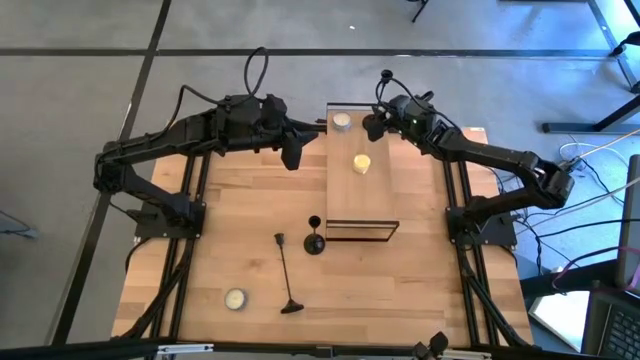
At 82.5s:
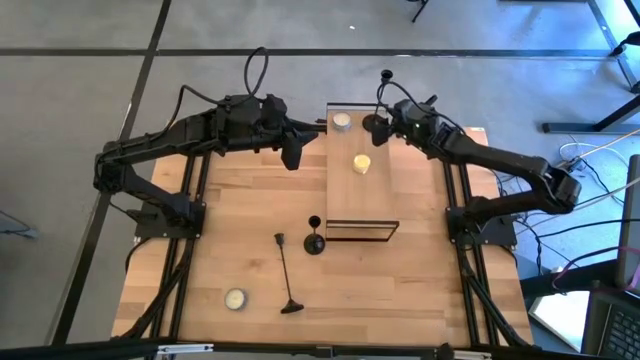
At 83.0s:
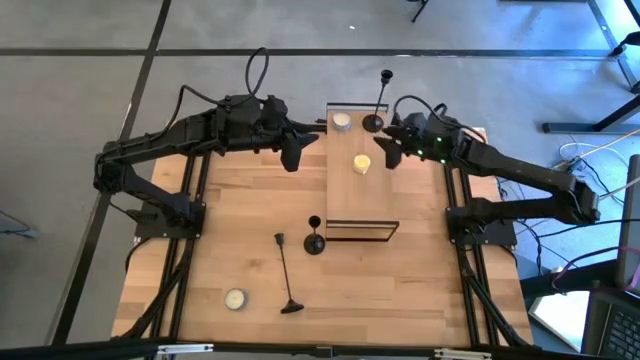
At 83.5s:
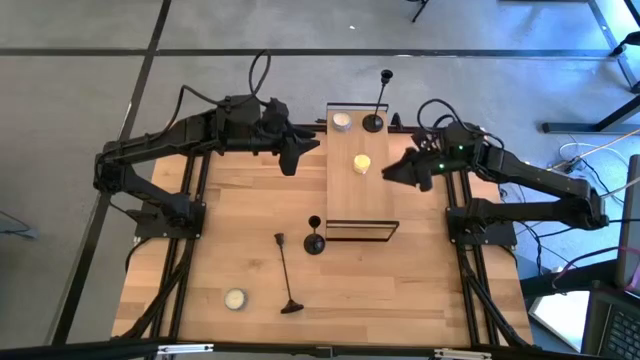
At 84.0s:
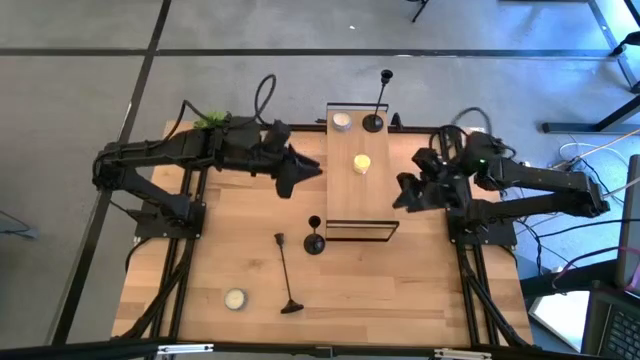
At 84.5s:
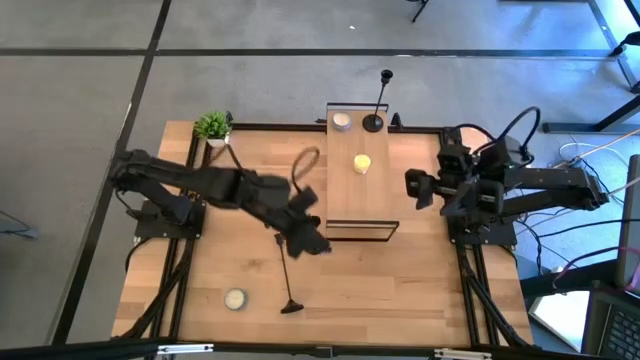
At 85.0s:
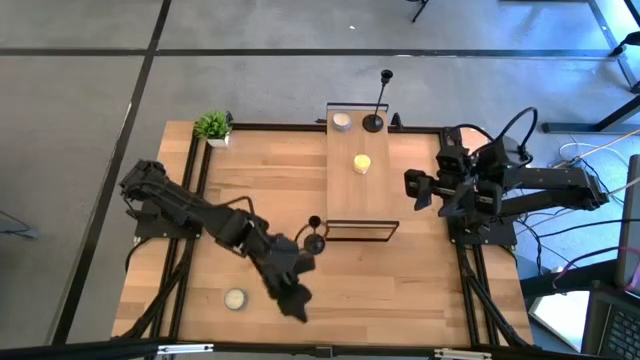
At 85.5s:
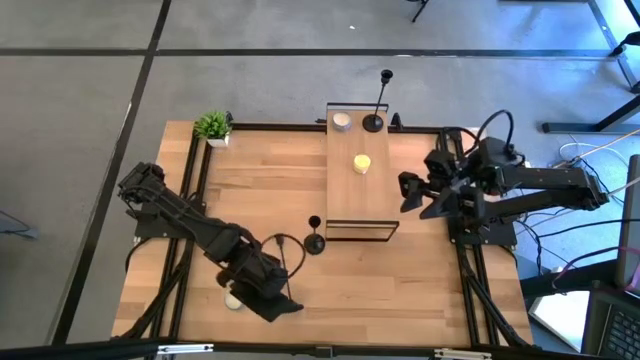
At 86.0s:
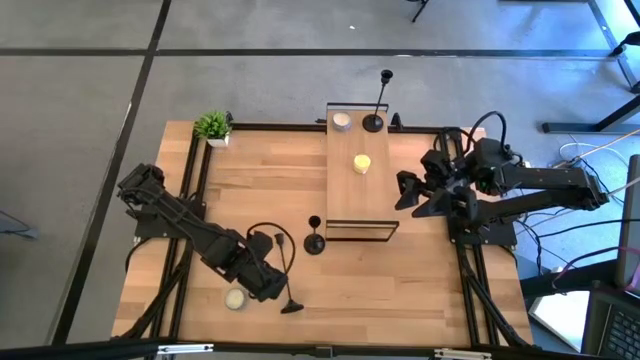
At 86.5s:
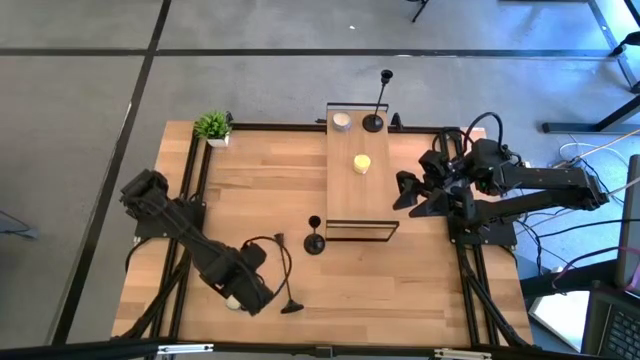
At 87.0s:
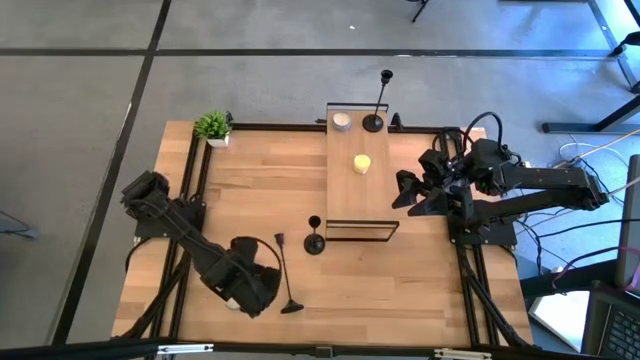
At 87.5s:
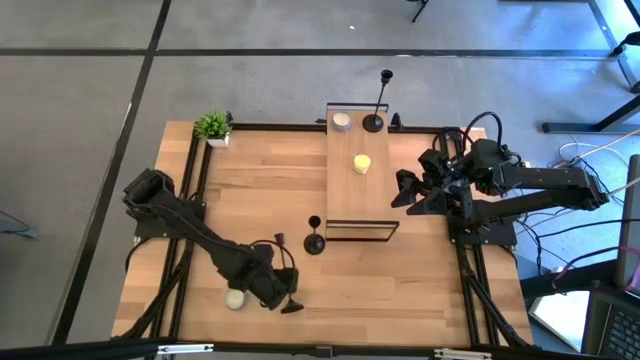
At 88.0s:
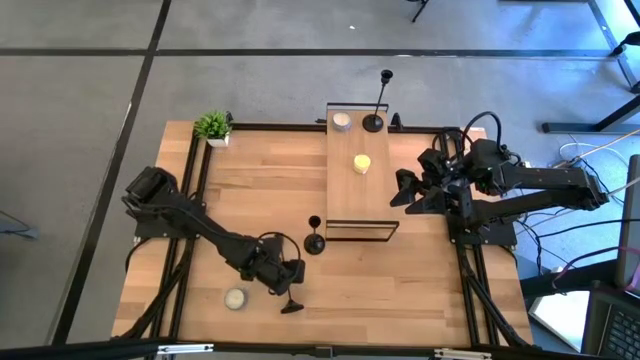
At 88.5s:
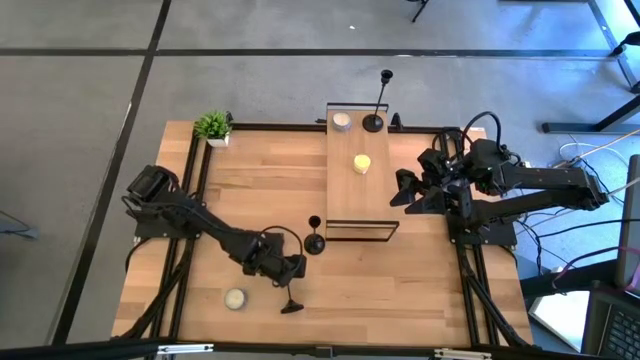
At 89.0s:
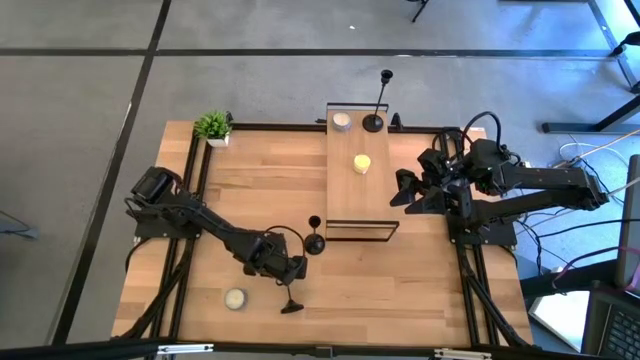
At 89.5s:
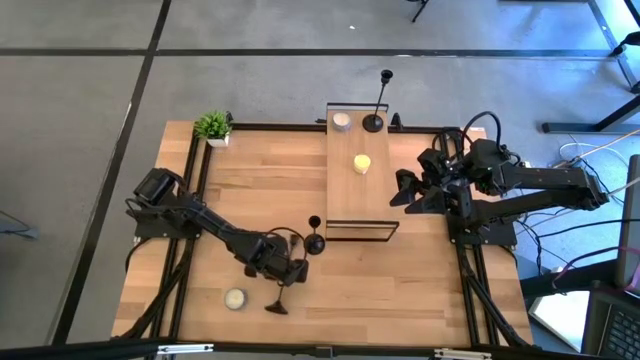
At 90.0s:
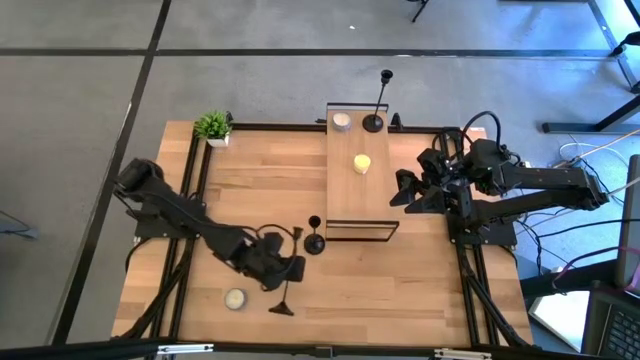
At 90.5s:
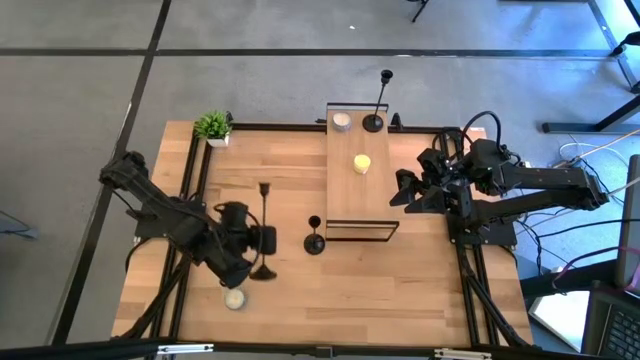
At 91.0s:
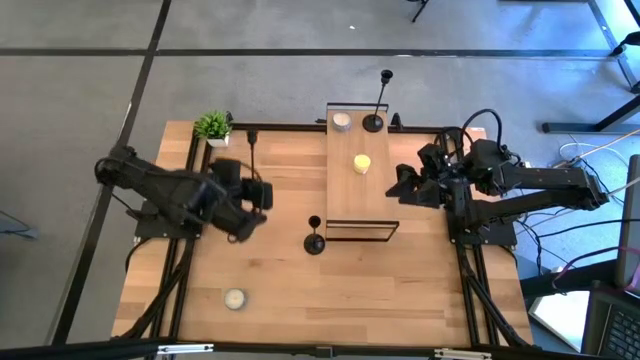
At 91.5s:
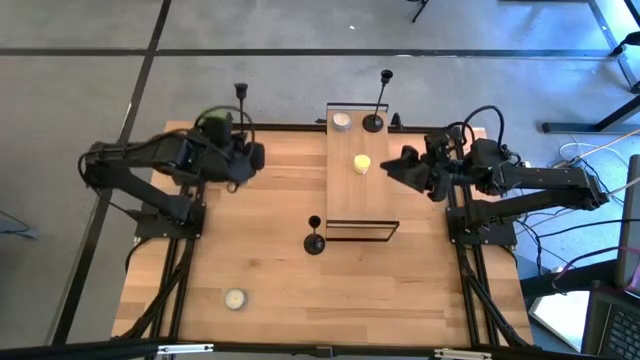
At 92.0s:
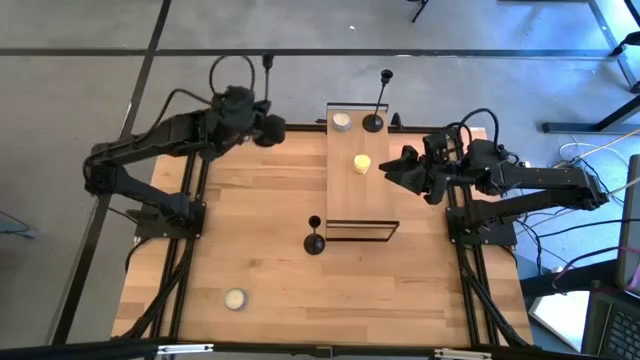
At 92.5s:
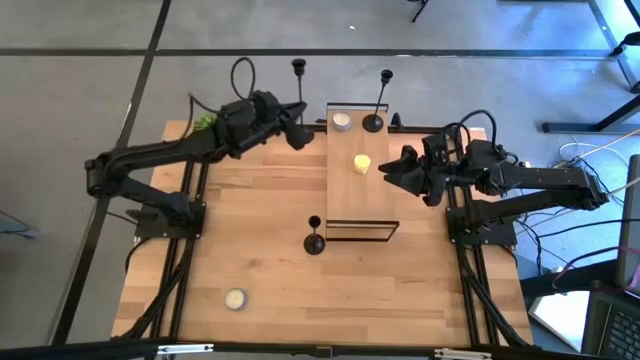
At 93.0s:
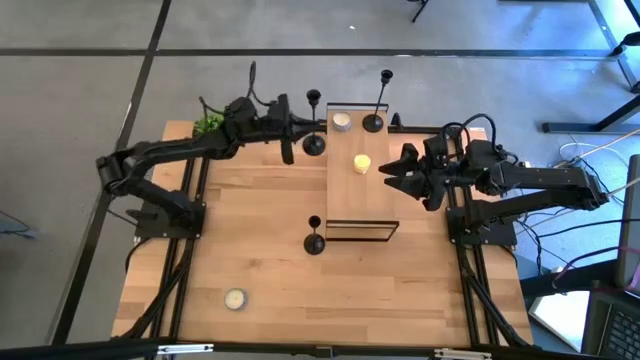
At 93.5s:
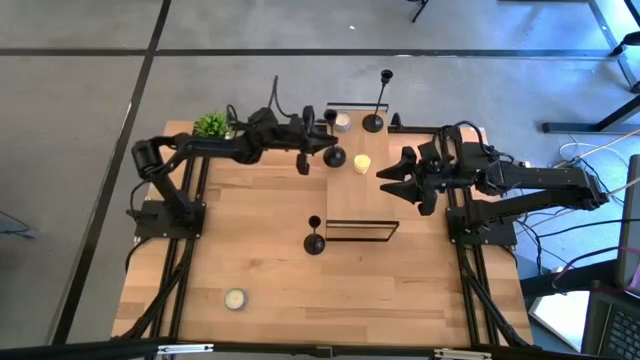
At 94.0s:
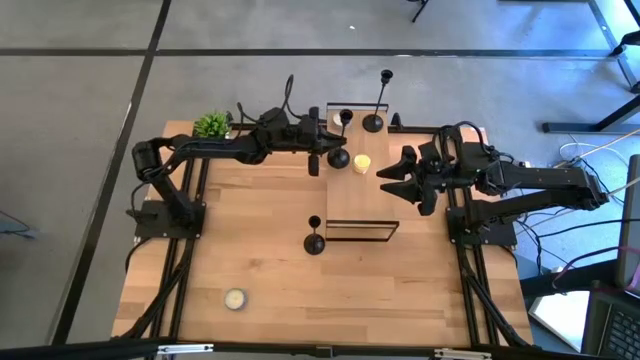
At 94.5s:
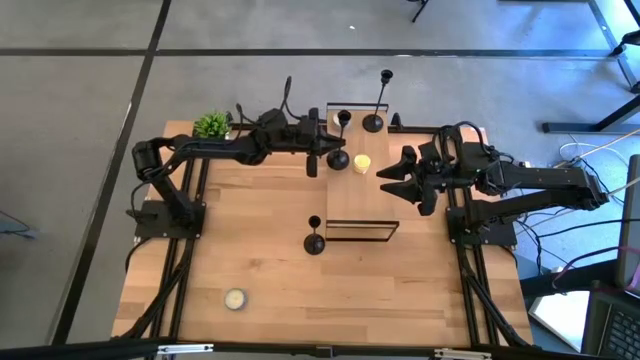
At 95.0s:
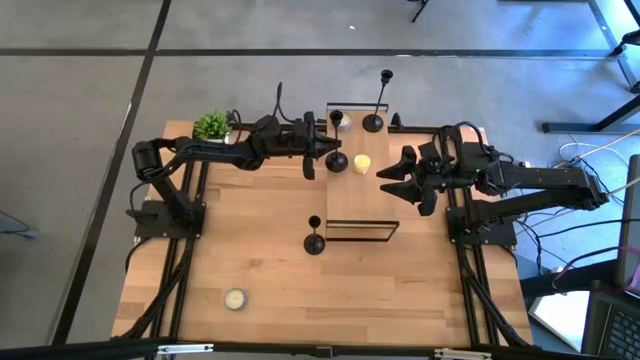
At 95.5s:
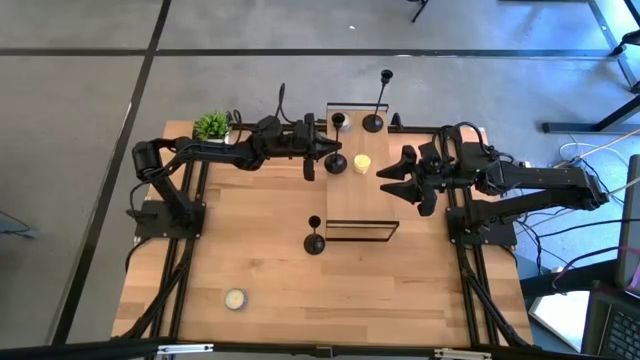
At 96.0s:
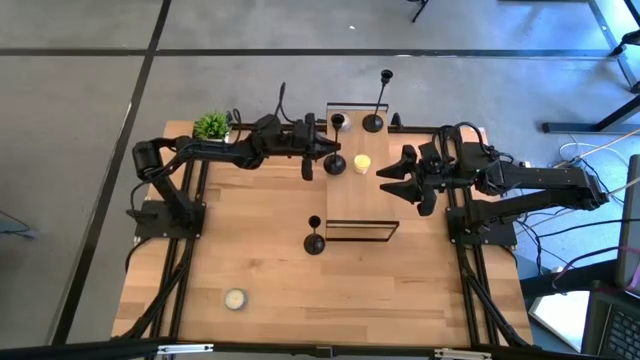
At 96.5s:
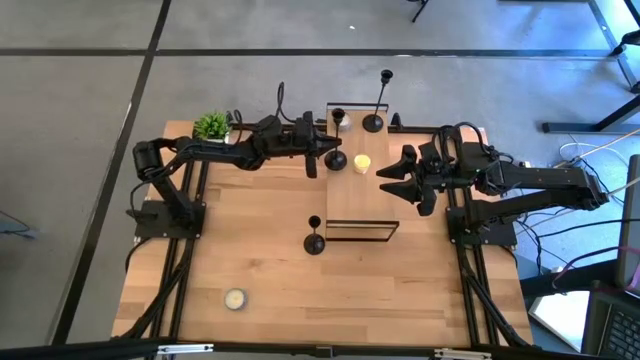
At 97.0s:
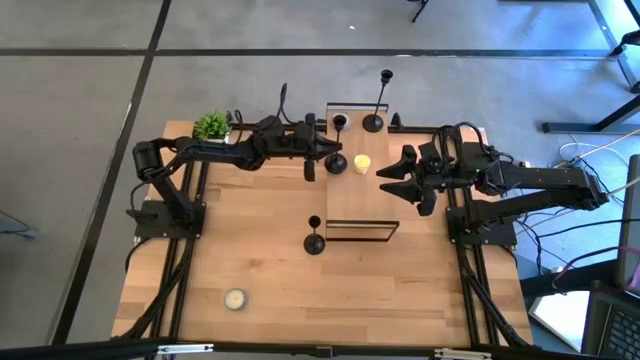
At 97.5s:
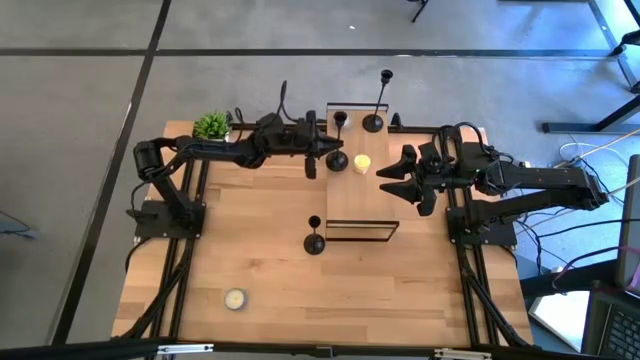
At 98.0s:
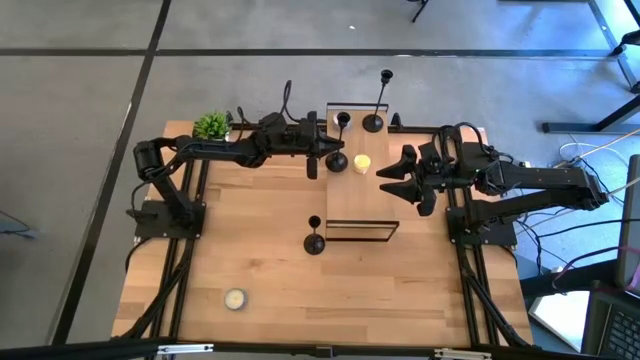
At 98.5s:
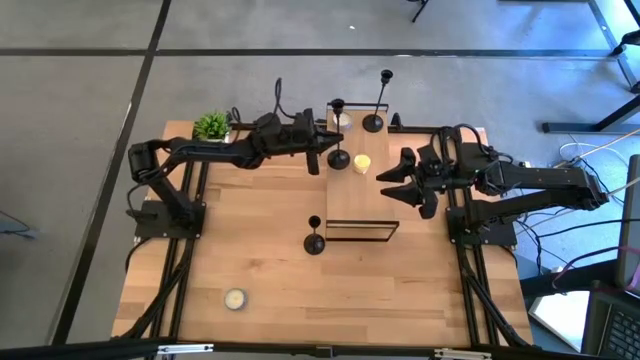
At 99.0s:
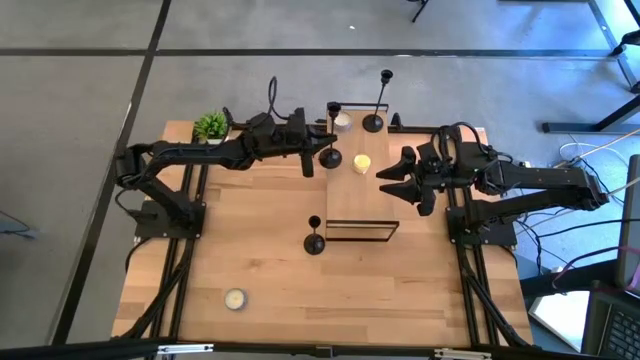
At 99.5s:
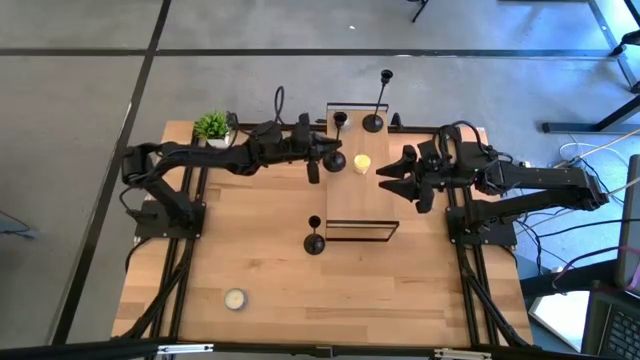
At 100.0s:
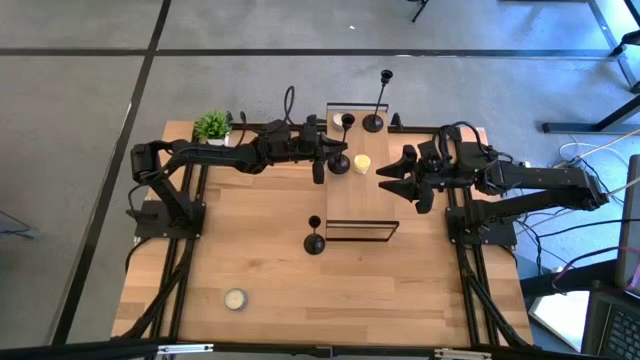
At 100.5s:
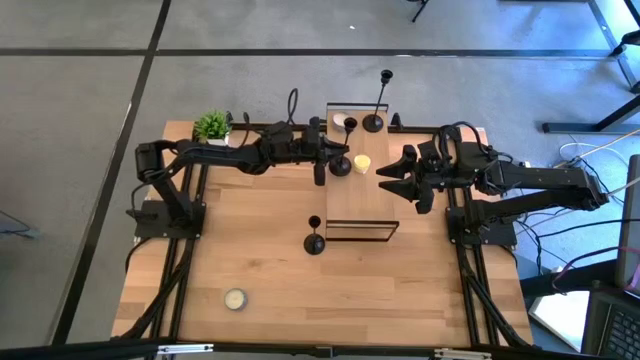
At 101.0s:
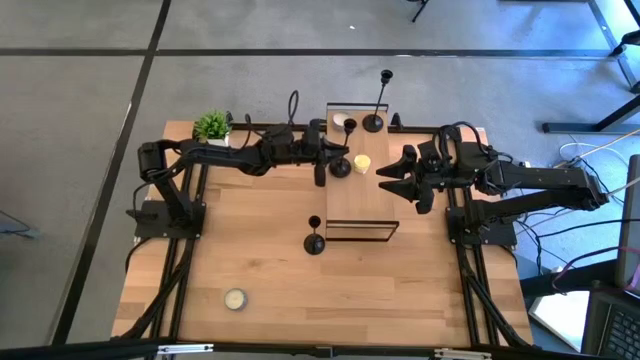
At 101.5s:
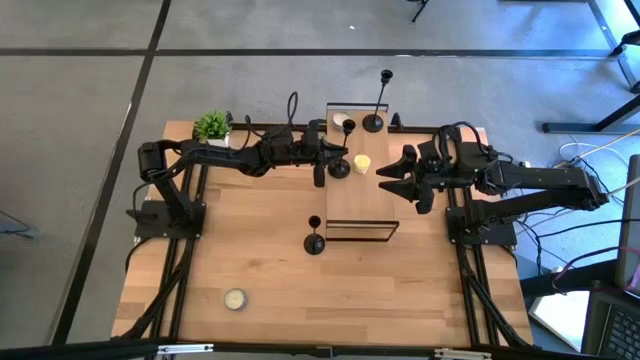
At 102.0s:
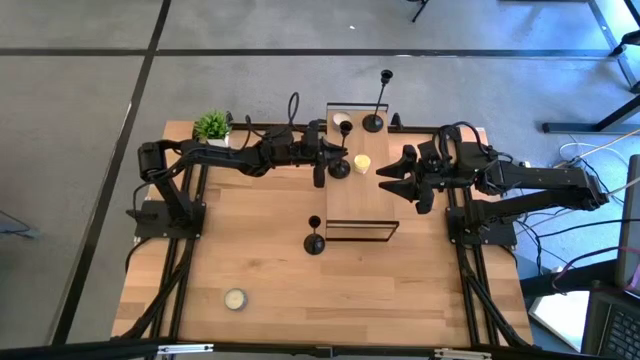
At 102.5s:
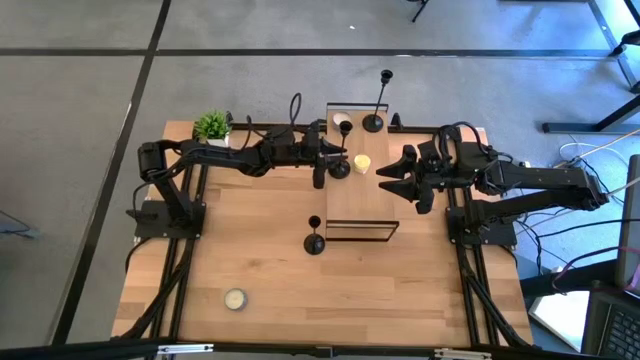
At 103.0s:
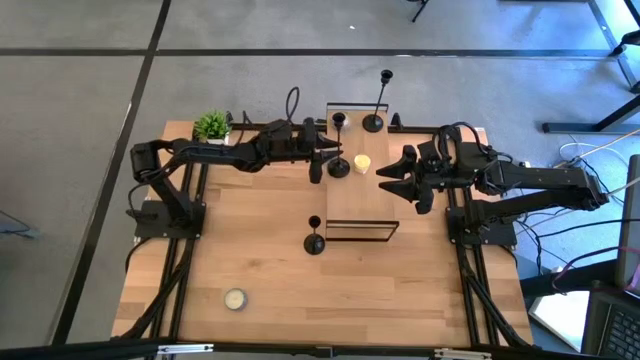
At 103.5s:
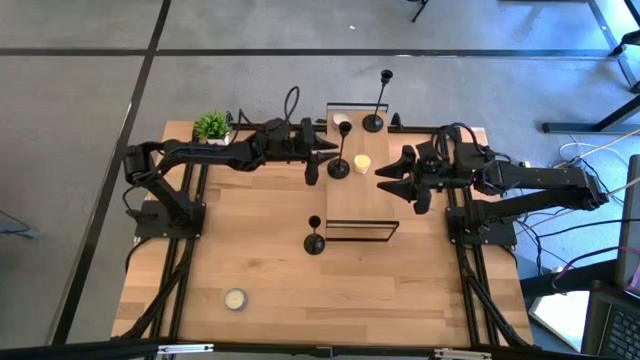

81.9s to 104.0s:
Task: Pick & Place candle stick holders
Put the left black candle holder to the left of the yellow candle jar on the shelf
